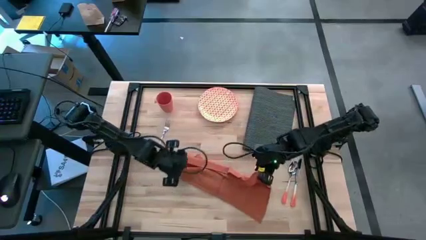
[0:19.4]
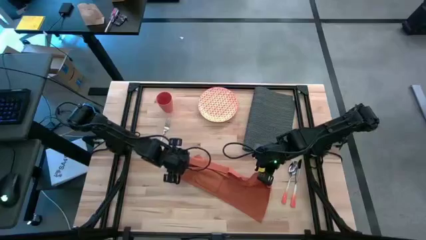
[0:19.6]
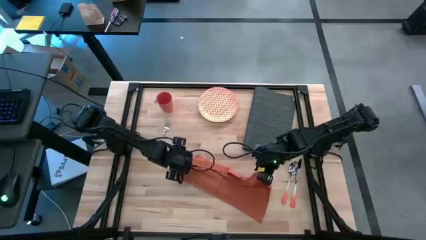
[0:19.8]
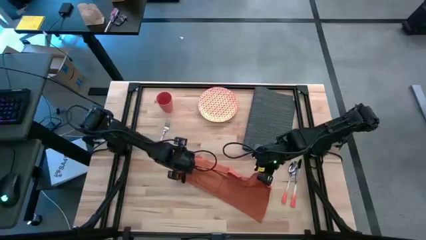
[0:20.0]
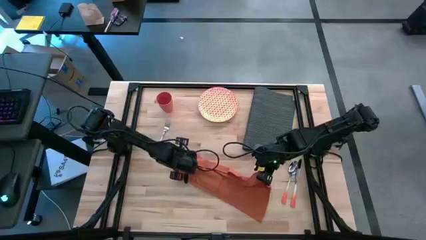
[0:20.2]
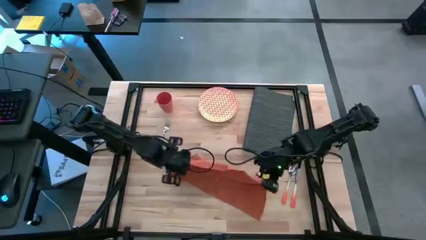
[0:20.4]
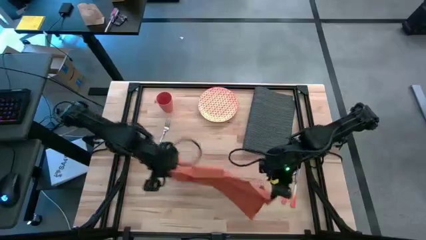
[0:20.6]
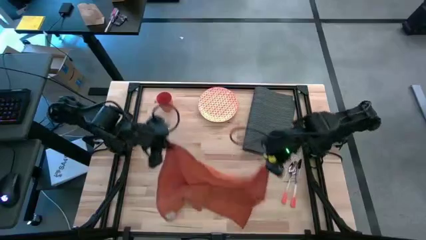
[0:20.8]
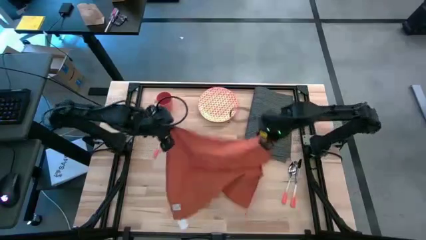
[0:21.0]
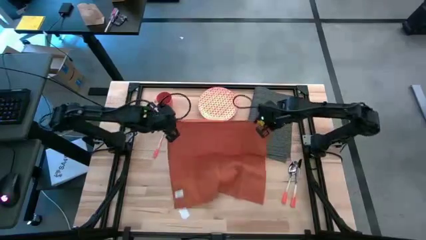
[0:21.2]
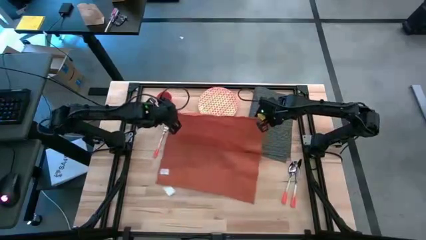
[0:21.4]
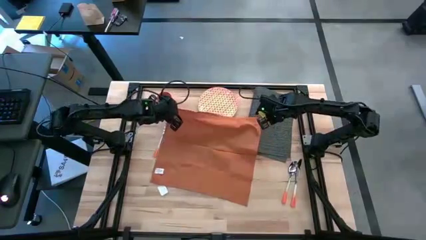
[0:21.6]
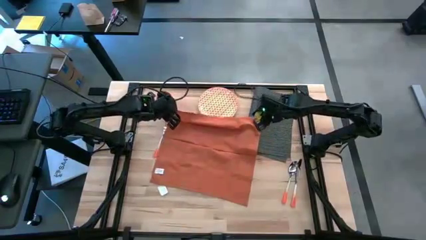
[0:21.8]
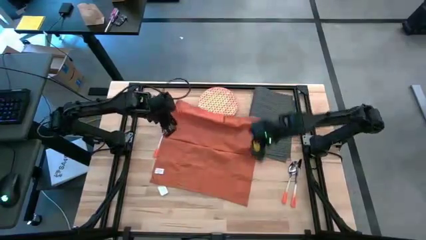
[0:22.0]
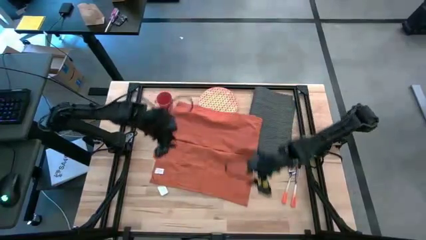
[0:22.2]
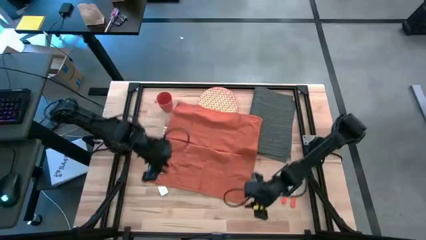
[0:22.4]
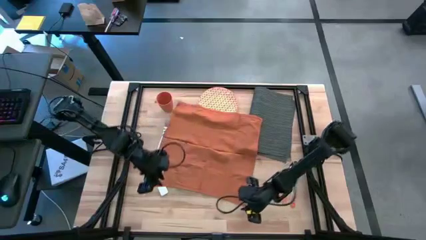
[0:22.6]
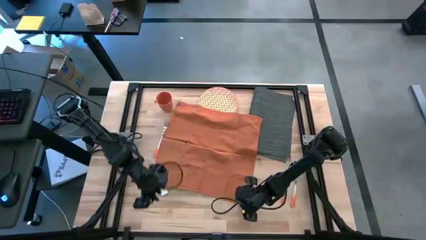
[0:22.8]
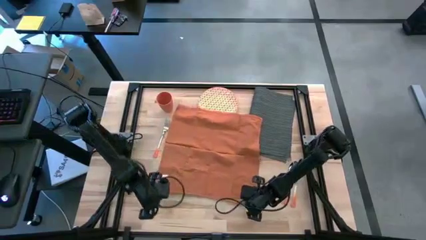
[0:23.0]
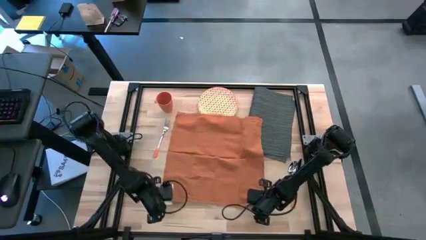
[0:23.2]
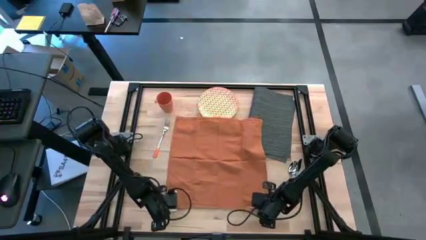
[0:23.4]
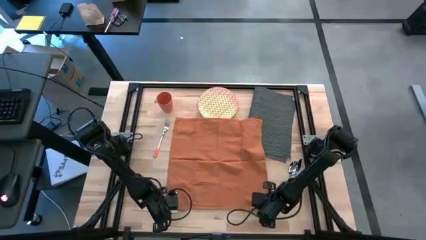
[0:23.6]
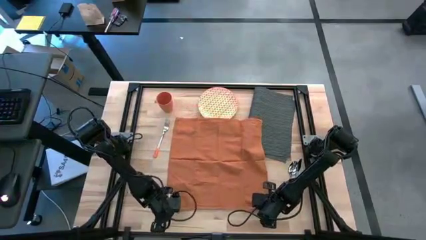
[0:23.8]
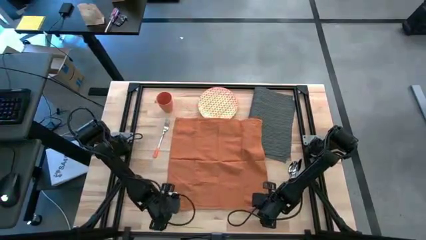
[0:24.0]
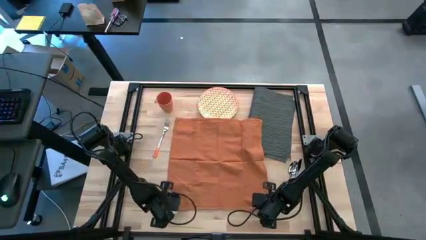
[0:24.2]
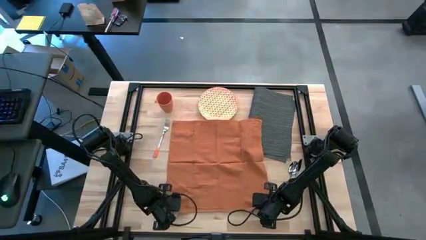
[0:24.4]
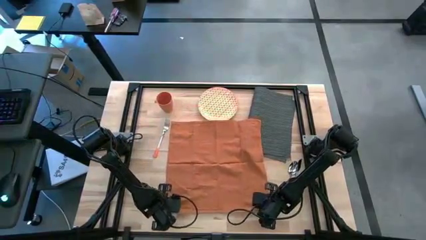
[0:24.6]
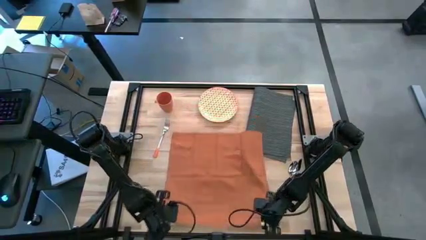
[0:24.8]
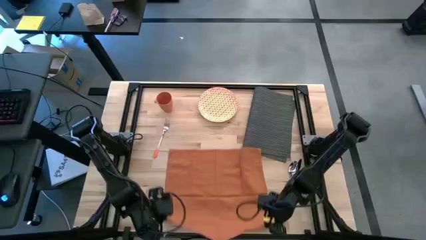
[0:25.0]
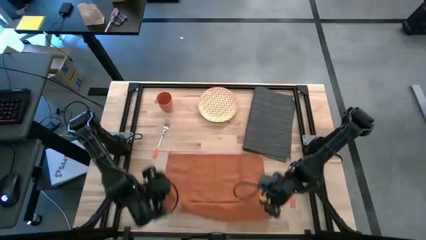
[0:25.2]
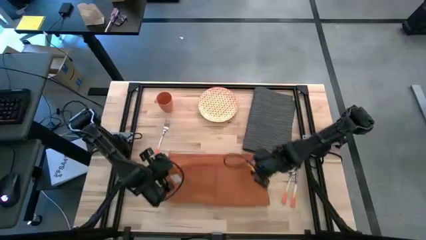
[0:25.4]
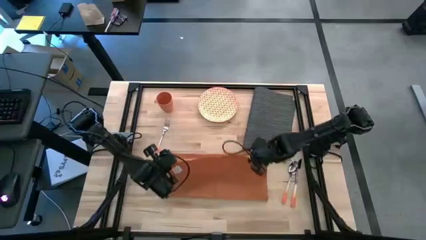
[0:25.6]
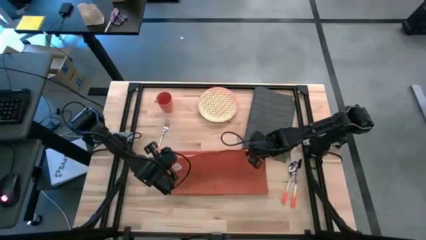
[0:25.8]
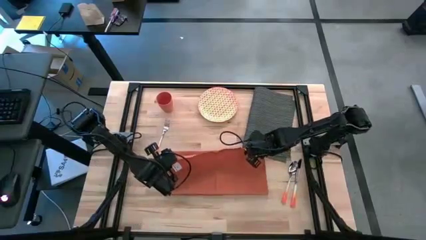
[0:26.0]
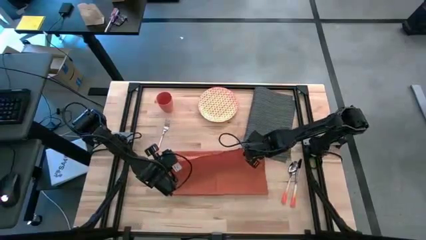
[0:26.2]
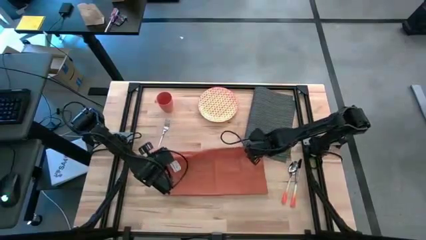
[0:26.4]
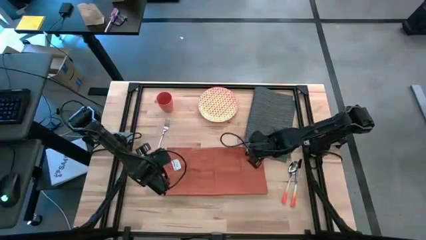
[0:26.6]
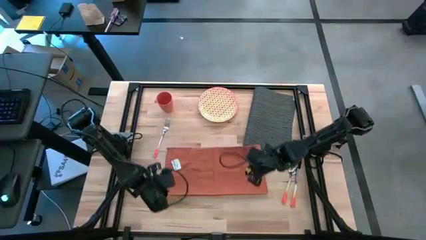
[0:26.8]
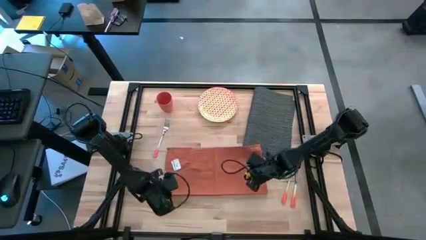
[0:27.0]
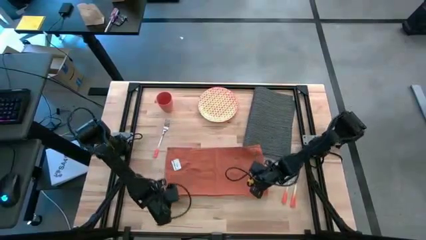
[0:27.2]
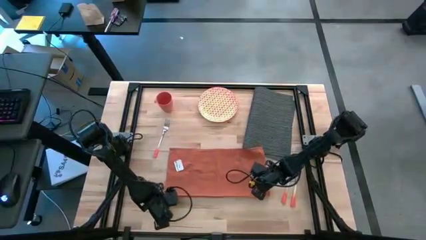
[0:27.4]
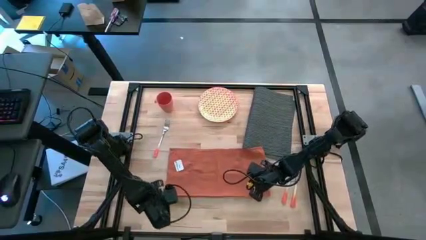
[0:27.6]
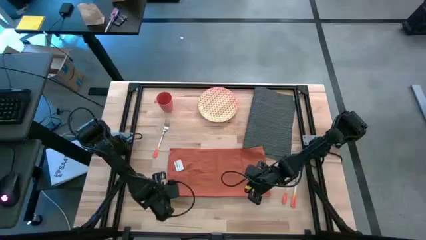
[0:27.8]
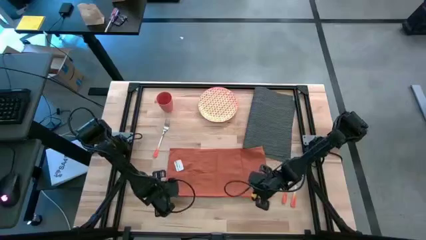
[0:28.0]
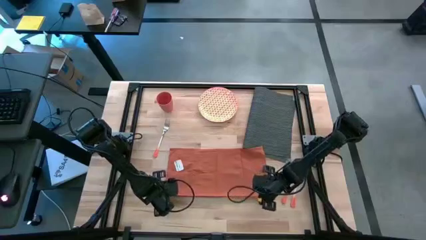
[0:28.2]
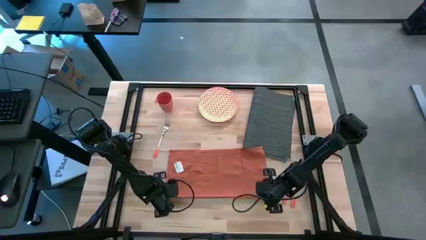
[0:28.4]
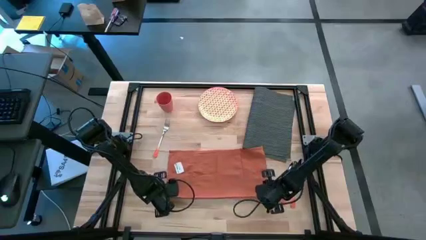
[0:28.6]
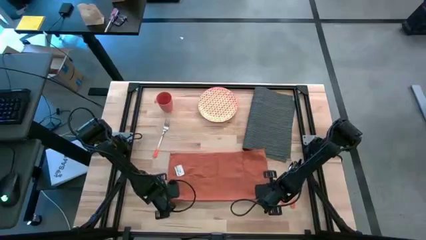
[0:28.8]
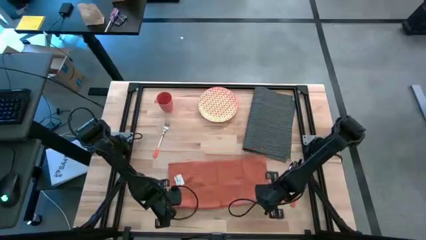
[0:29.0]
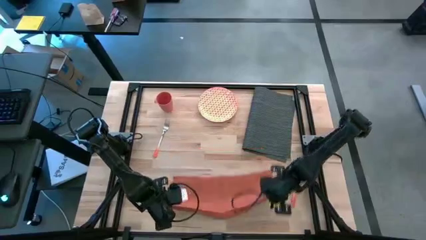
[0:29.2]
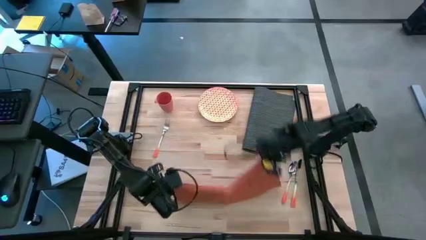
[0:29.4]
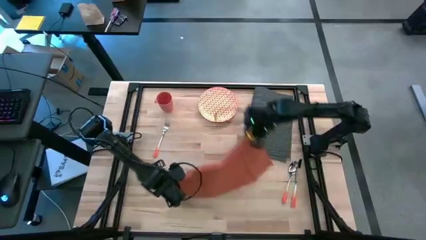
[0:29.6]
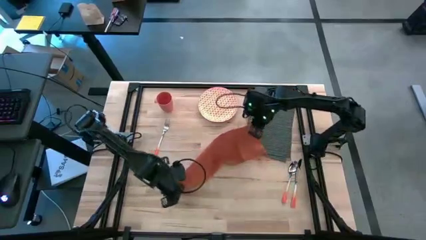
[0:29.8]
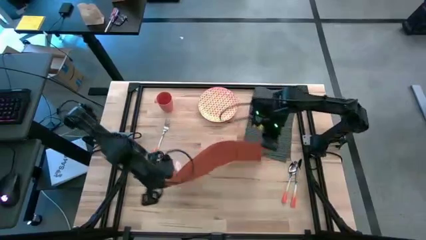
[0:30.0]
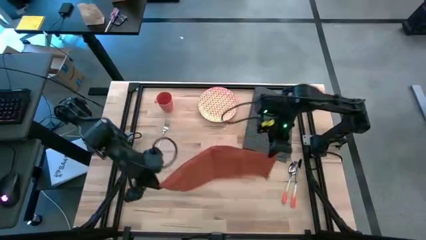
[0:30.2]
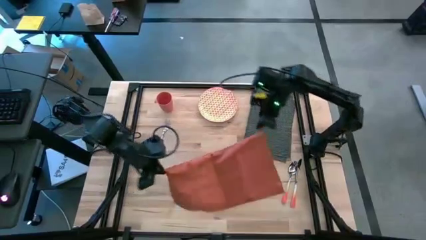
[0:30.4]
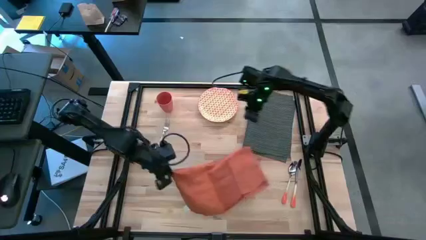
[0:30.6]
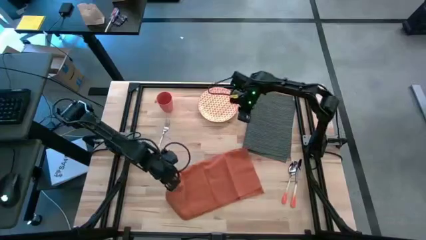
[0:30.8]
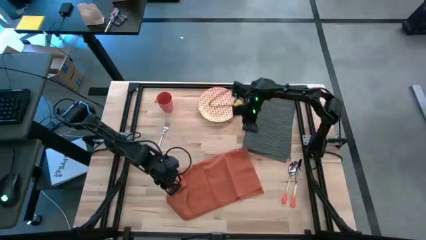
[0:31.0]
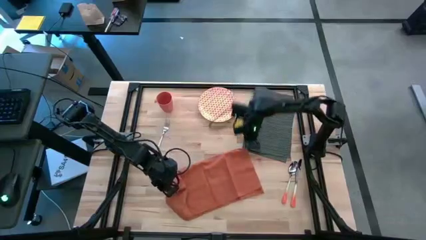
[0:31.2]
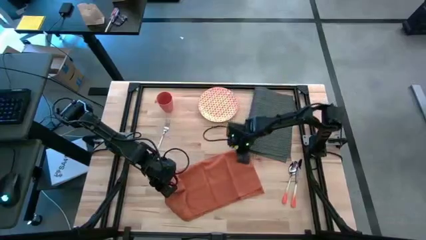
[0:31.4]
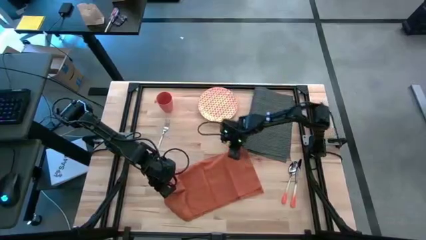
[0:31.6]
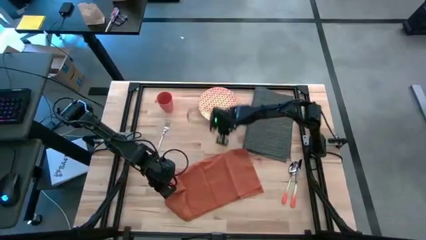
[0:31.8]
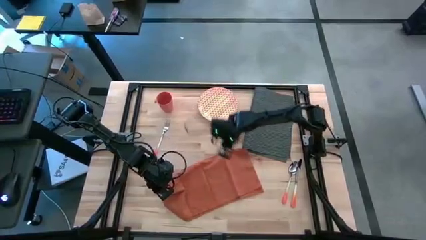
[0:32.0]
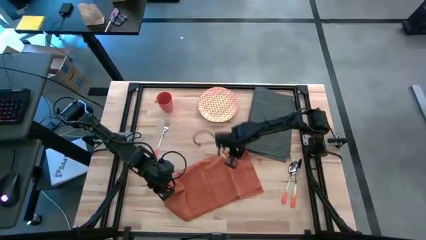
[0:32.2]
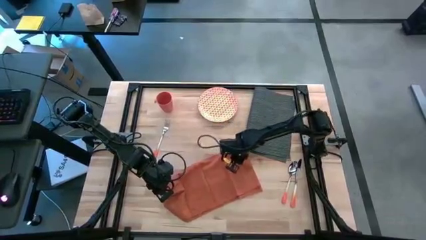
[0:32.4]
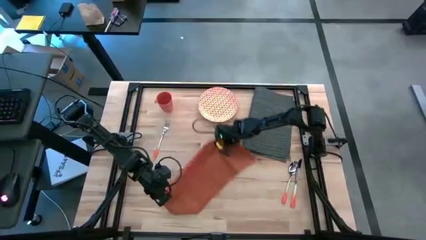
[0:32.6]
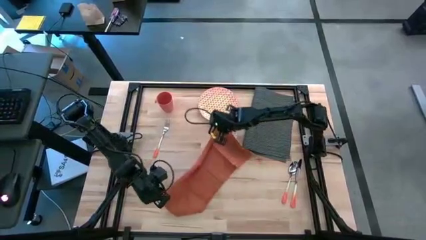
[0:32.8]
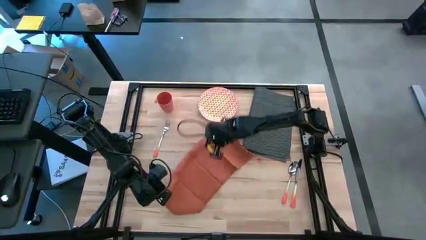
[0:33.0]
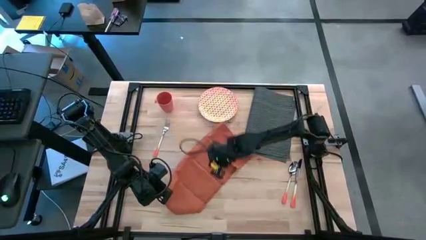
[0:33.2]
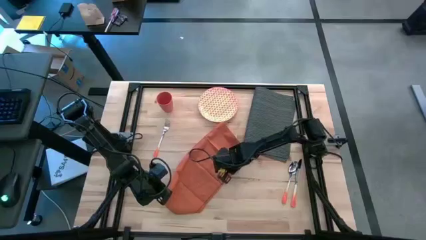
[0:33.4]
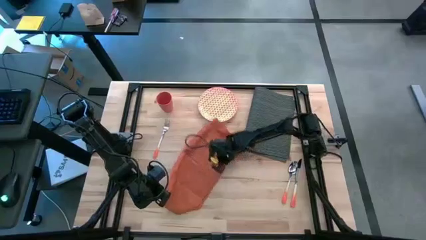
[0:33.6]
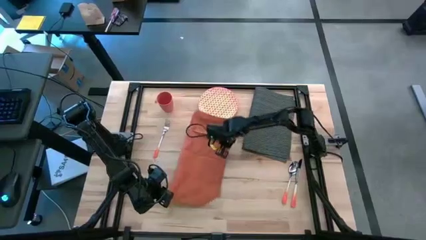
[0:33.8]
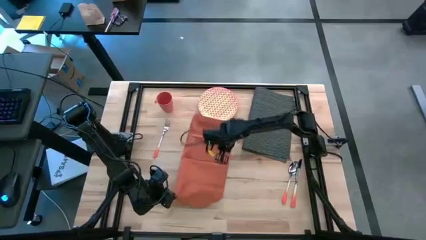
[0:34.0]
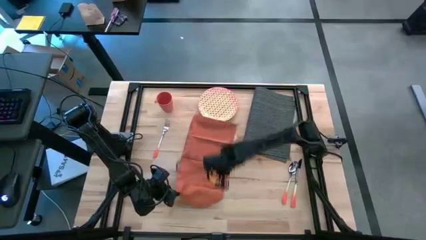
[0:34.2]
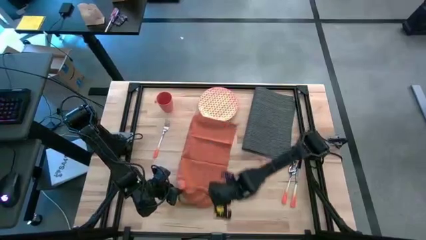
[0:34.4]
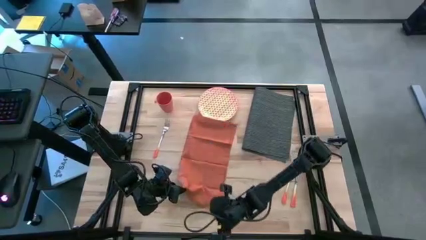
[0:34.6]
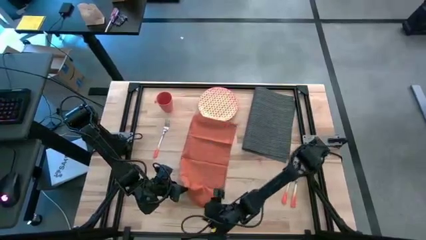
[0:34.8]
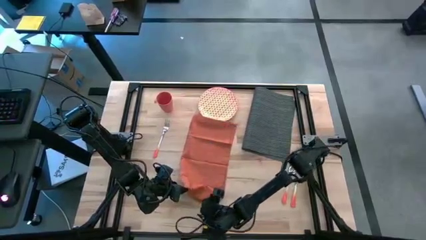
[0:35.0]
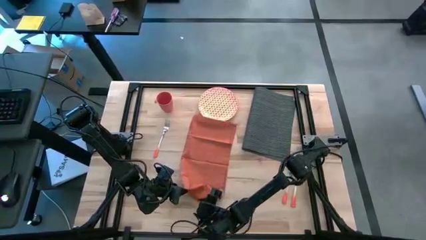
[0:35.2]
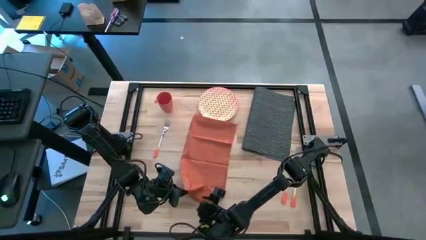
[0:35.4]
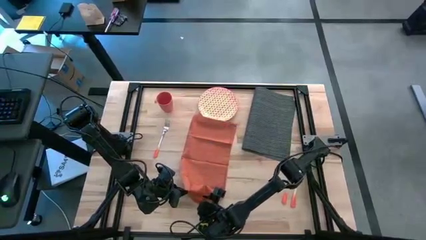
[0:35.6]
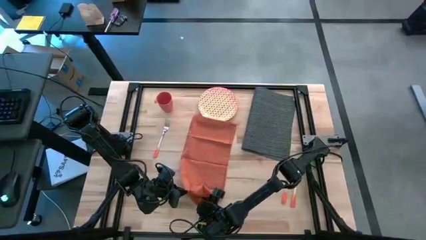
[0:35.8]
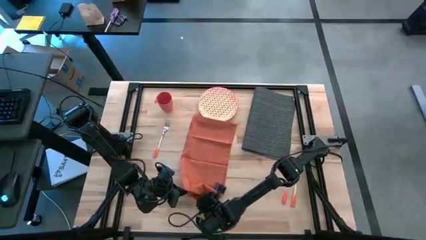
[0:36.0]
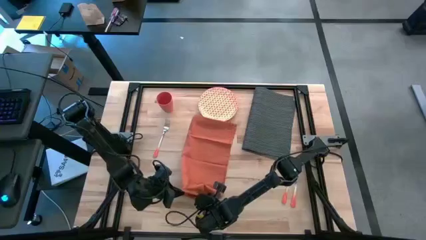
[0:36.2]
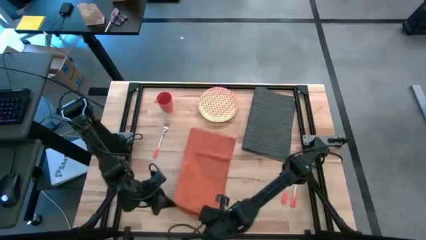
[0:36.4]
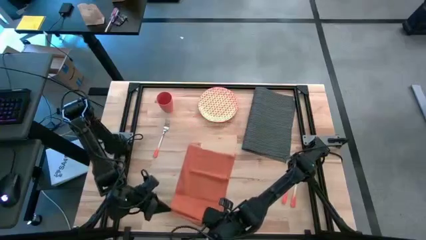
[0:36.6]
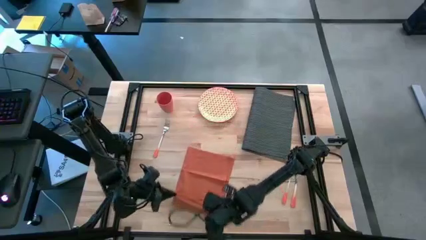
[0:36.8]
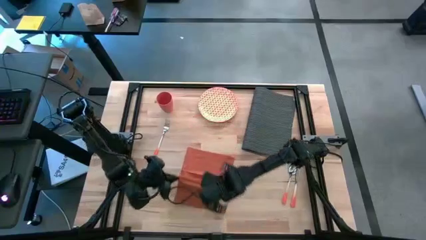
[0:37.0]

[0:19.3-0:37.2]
Task: Set table place
Fold the orange table napkin
